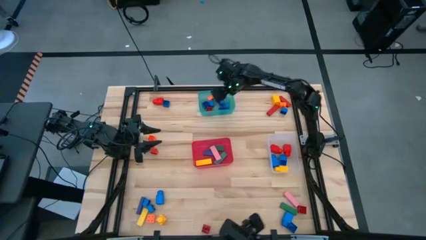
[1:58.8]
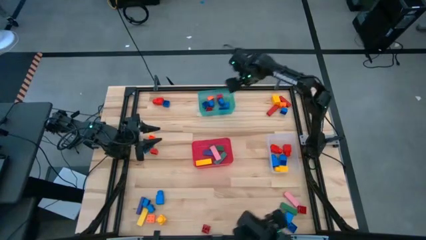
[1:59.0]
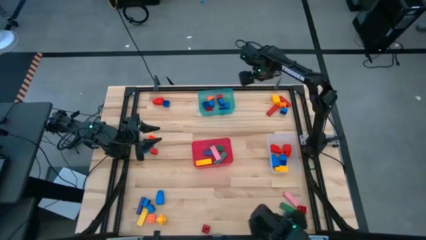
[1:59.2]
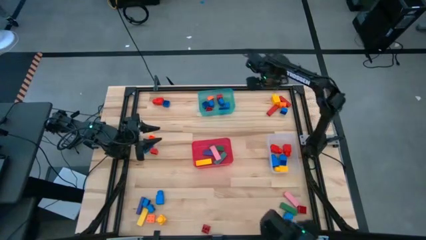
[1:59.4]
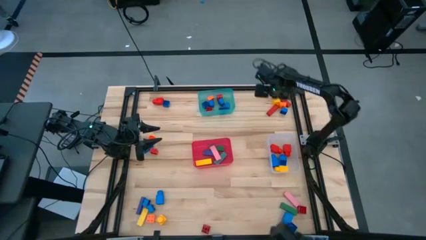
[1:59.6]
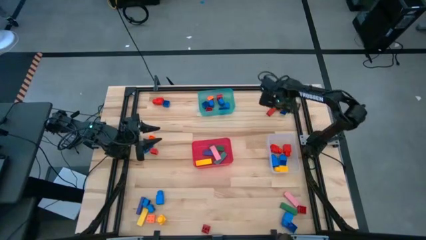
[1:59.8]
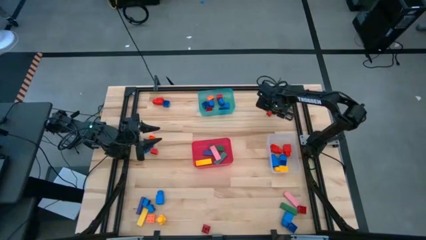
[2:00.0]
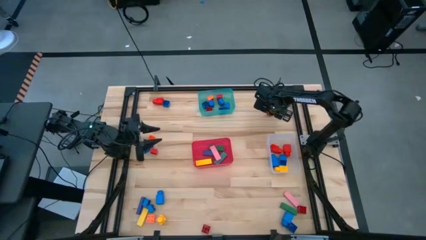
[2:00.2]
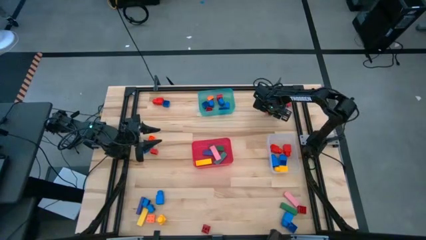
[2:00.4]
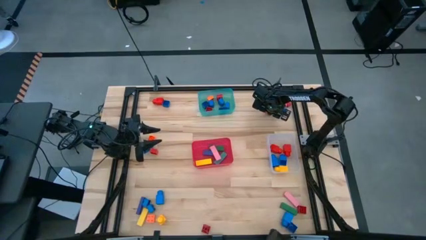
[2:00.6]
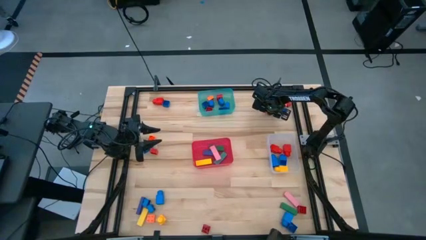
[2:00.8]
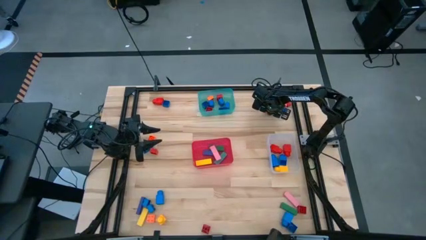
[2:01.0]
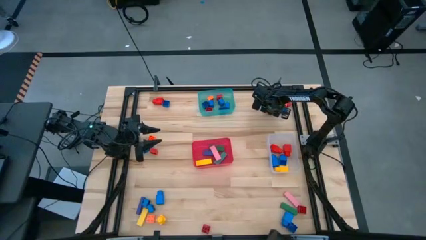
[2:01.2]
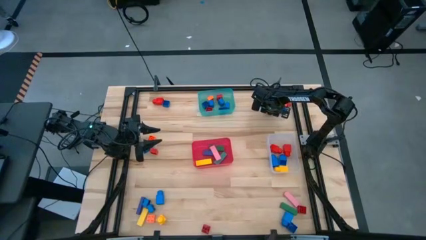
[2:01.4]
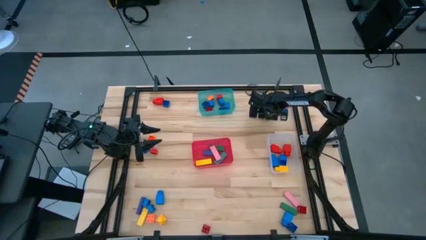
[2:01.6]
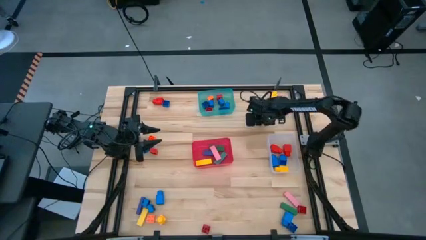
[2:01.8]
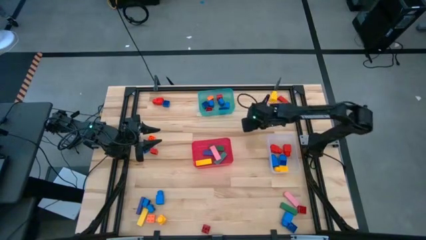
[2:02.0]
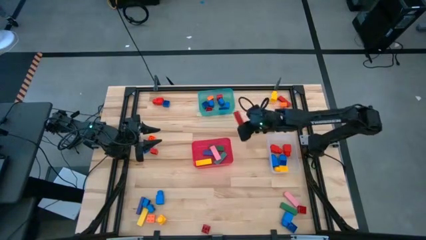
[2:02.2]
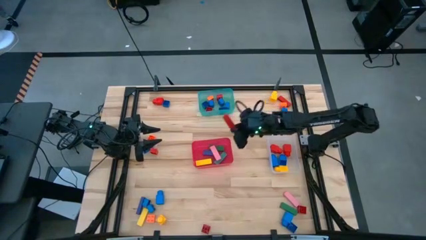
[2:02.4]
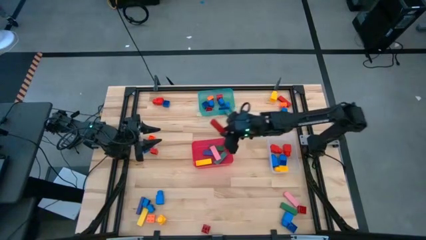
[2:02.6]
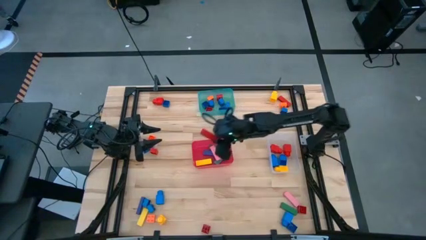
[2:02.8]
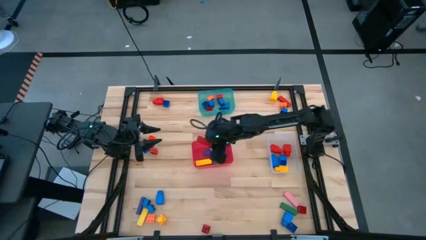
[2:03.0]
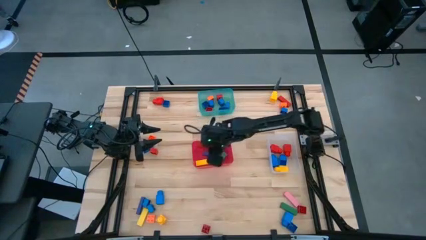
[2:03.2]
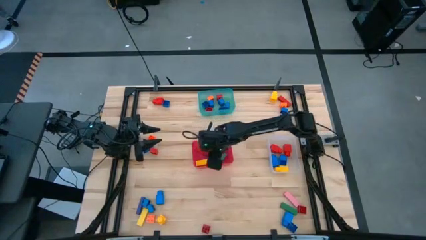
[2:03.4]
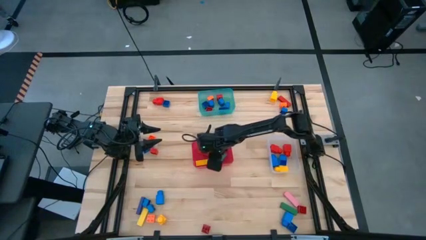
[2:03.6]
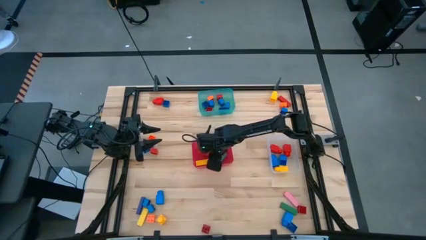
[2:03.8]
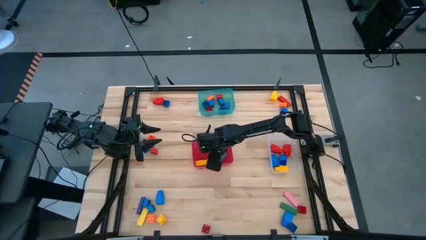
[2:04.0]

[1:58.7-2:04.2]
Task: Sort blocks by size
Put the red block into the red bin

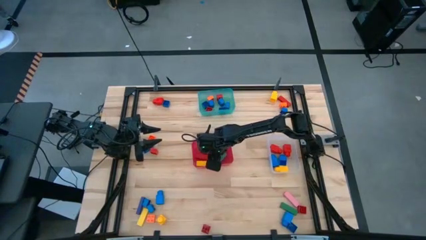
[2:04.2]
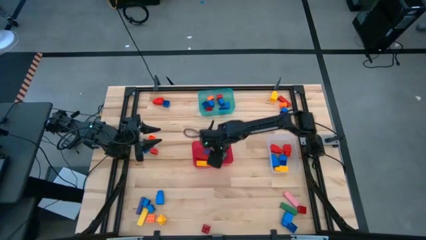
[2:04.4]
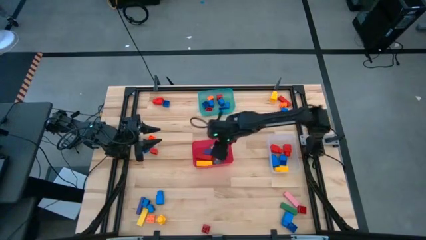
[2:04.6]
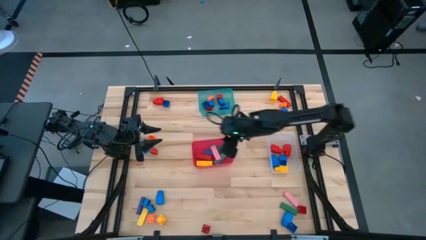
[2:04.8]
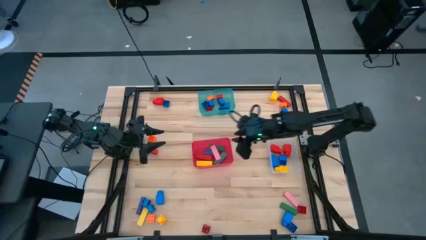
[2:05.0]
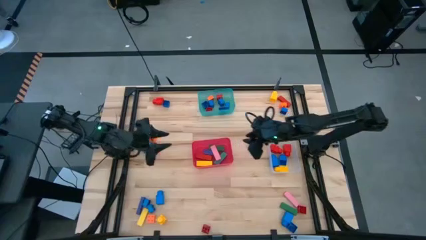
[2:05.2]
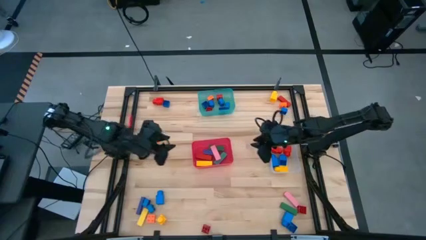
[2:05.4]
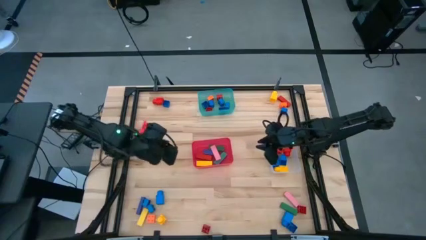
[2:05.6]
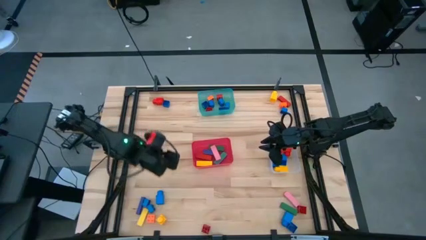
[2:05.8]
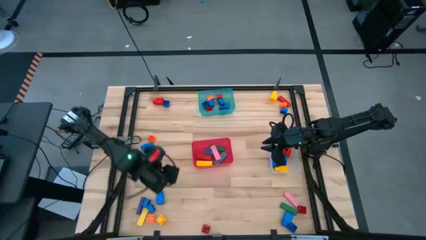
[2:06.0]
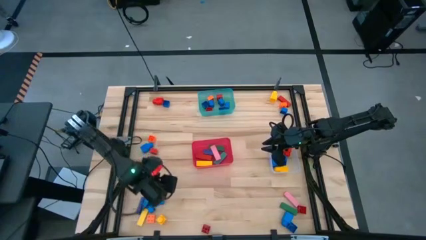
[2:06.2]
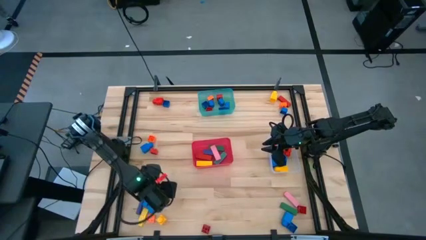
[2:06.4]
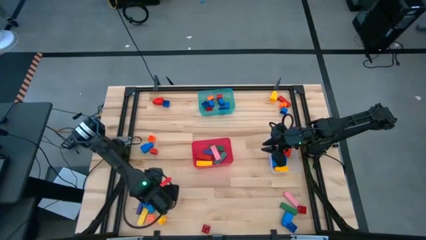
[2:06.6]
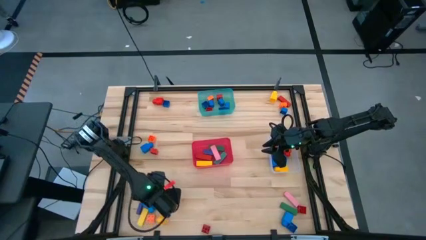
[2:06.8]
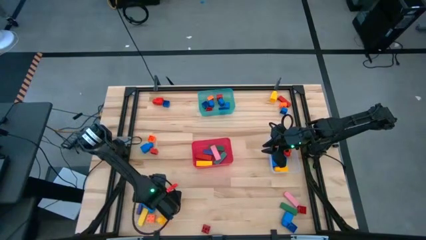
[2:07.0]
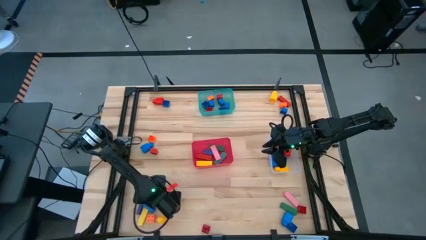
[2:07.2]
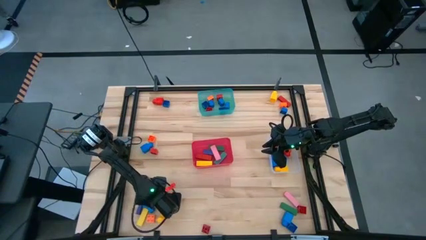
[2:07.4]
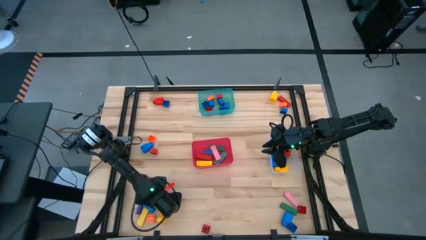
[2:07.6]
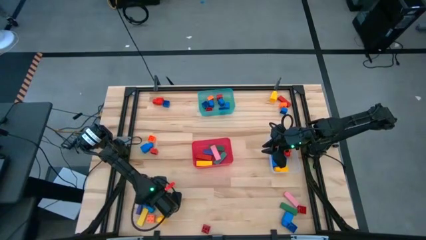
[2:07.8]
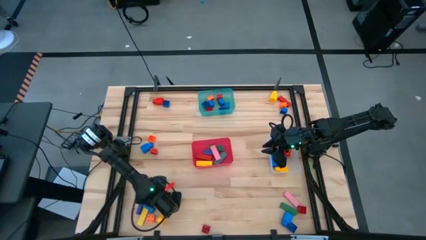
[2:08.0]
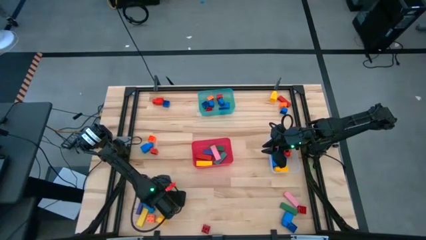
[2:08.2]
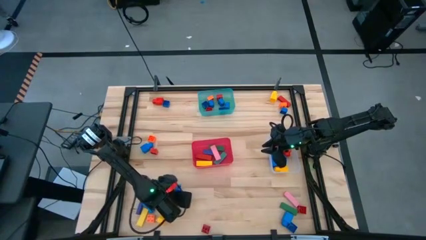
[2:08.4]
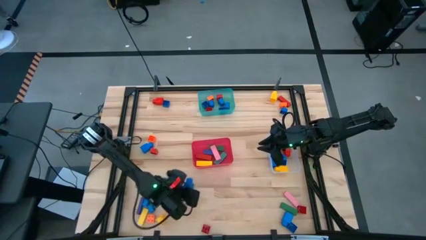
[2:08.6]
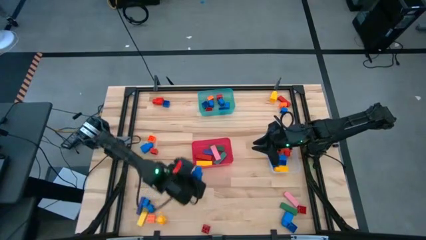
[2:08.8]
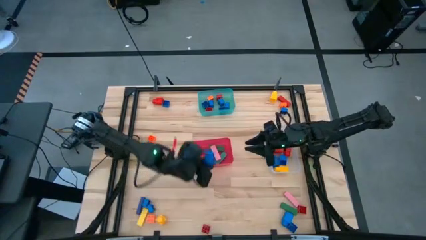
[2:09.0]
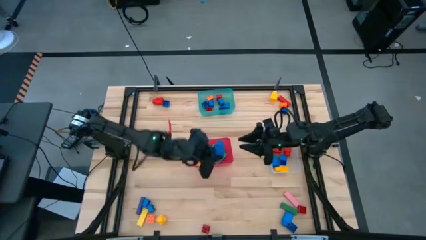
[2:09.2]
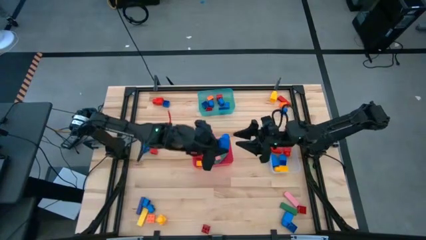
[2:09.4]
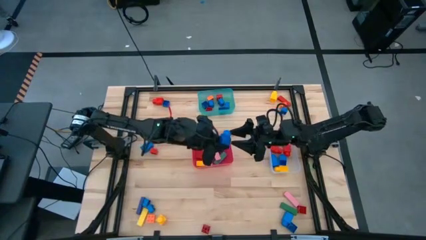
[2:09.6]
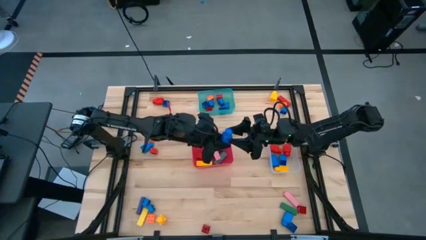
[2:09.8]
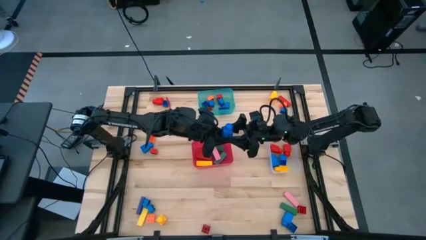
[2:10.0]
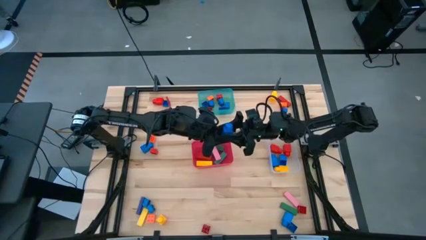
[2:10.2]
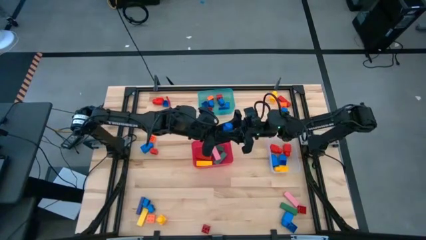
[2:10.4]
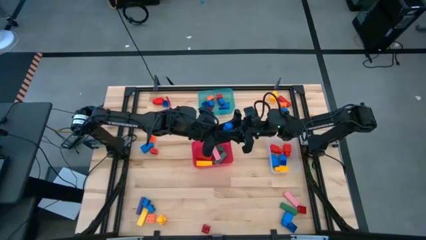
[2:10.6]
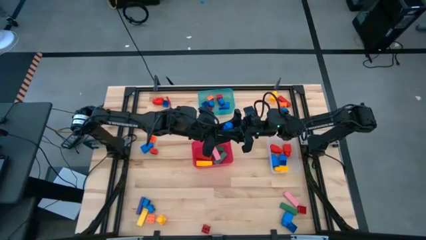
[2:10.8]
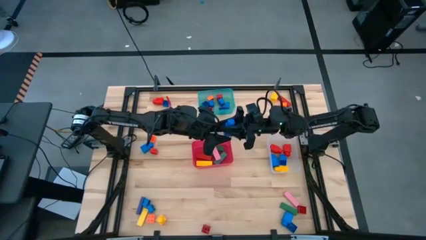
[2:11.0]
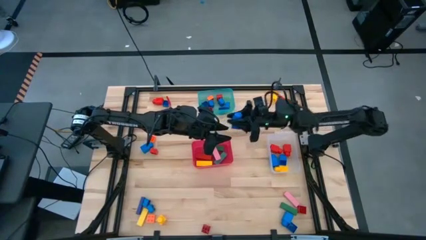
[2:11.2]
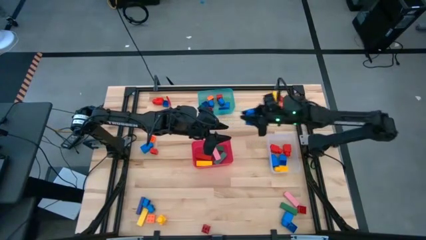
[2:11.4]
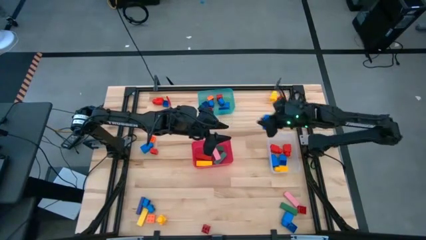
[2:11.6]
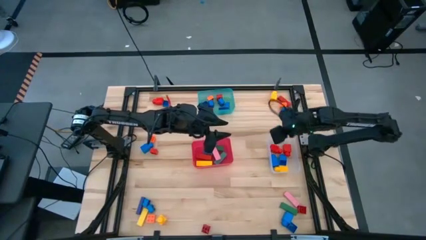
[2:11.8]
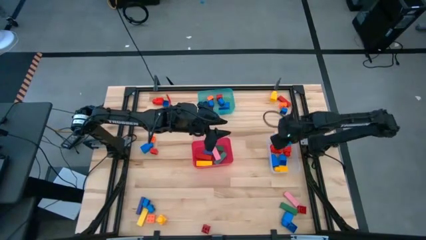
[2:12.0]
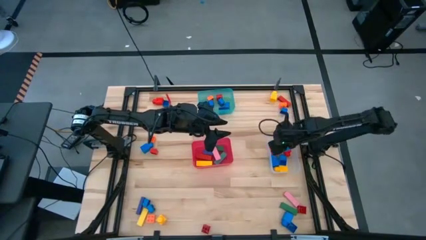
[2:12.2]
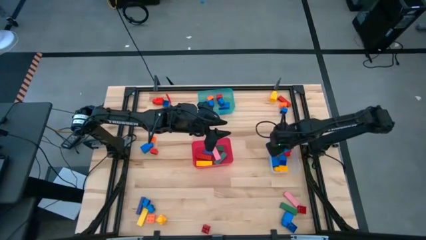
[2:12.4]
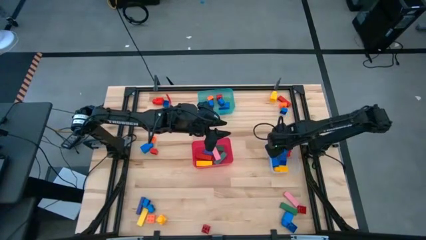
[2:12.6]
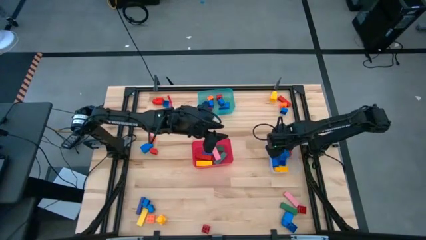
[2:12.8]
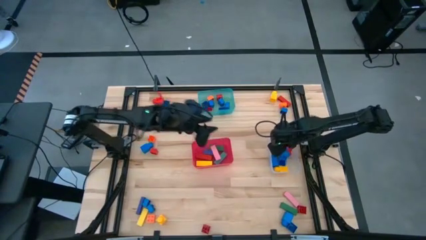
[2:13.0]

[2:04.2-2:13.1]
Put the blue 1 stud game piece into the transparent bin

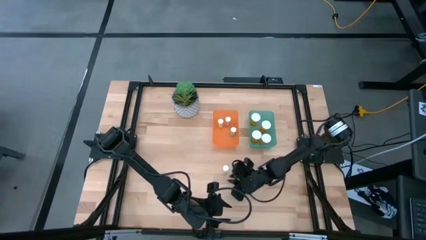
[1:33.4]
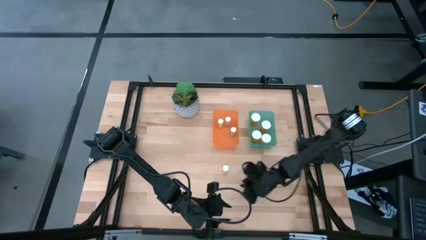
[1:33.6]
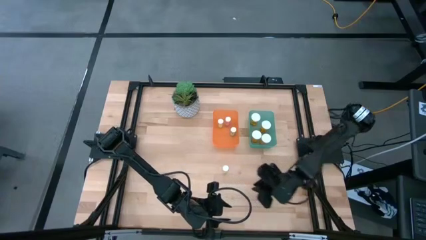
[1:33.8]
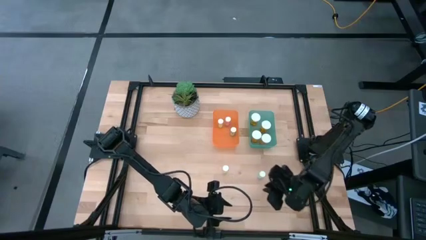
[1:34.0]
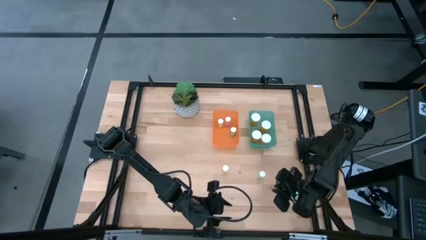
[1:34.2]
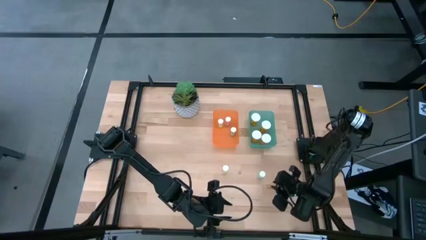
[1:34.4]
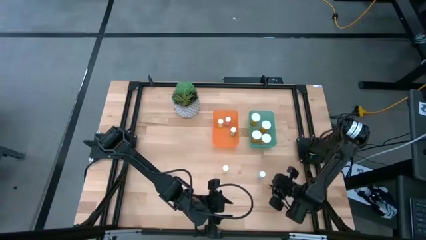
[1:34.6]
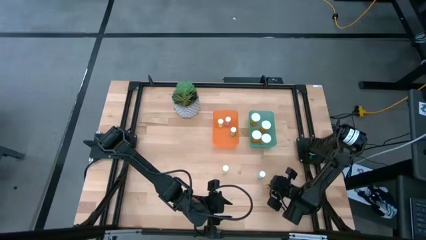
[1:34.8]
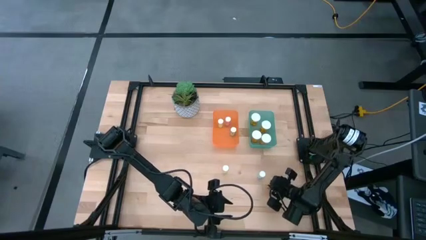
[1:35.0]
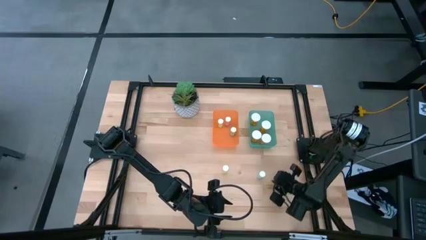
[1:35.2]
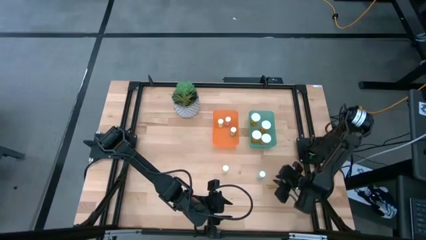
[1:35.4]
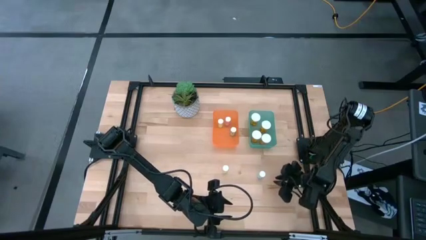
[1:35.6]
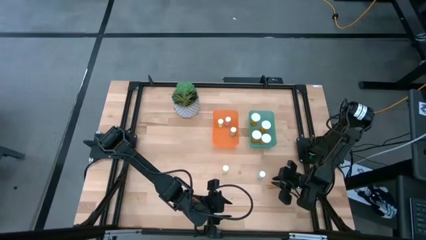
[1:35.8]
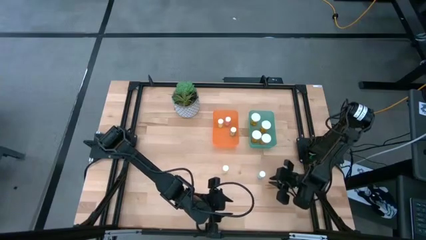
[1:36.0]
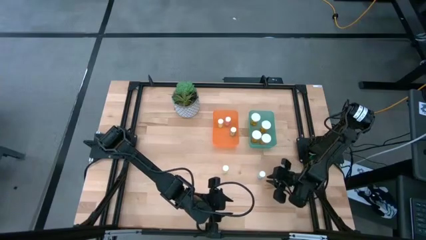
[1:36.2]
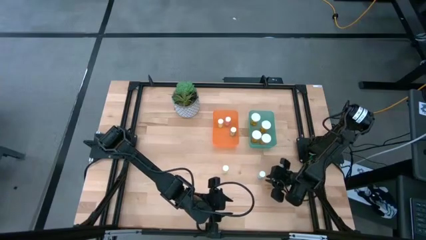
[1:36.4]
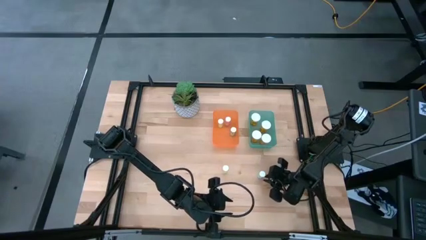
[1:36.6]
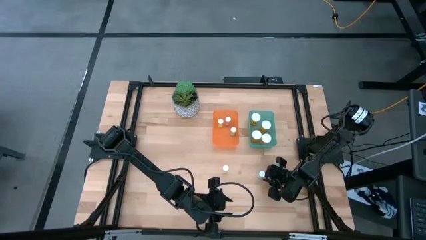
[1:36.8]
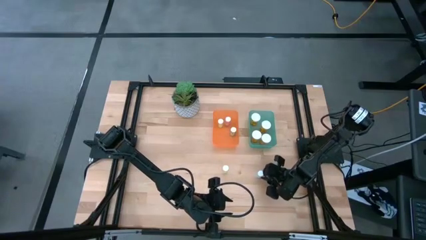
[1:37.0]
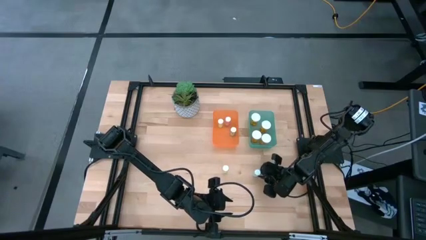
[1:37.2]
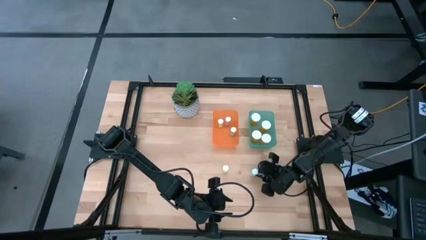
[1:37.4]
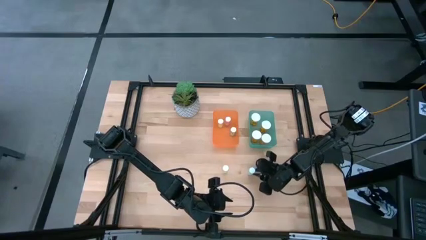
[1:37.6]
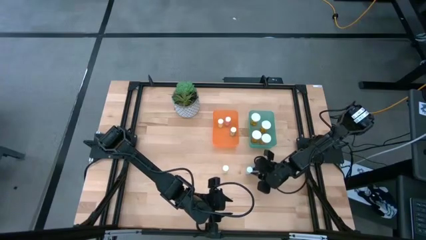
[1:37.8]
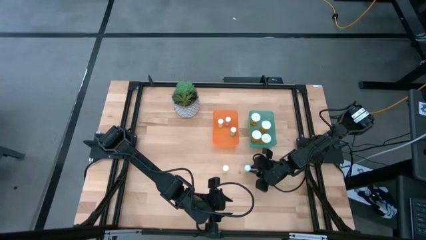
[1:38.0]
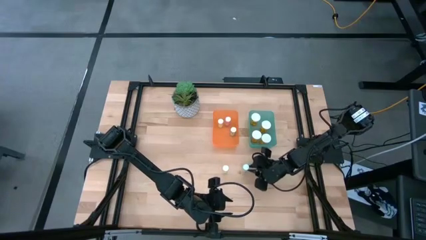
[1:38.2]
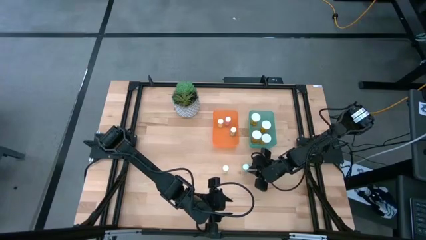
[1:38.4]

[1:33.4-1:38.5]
Task: Pick and place medicine bottles into bin by pill shape (circle, oval)
Adjust the small blue bottle
